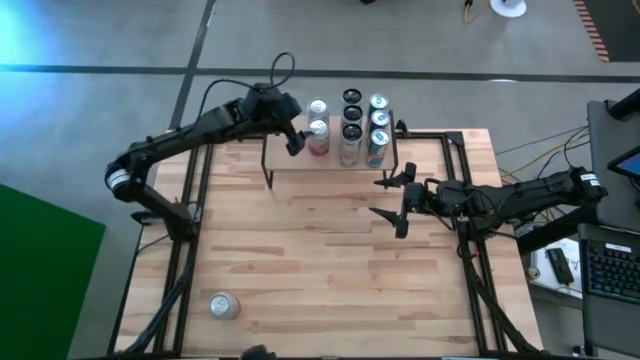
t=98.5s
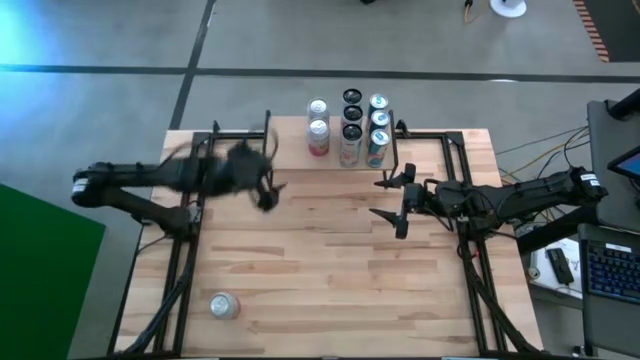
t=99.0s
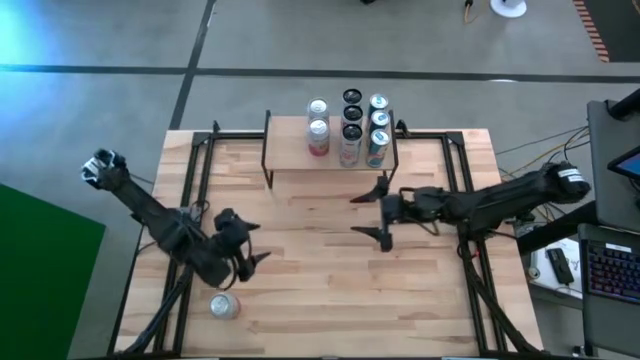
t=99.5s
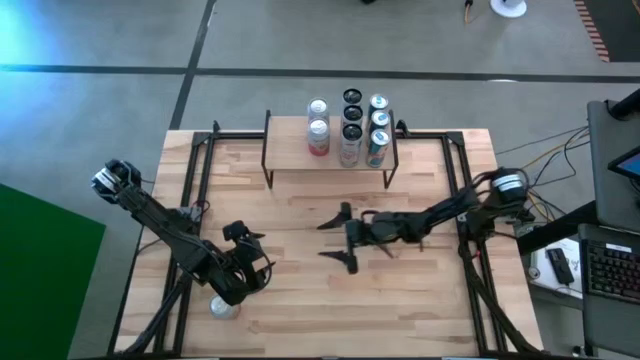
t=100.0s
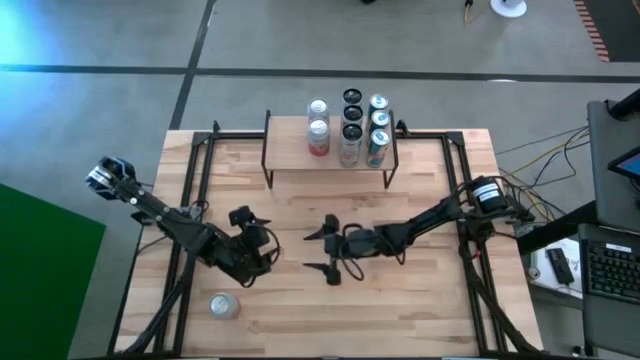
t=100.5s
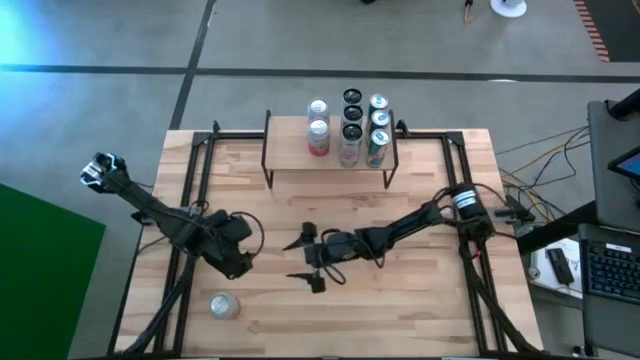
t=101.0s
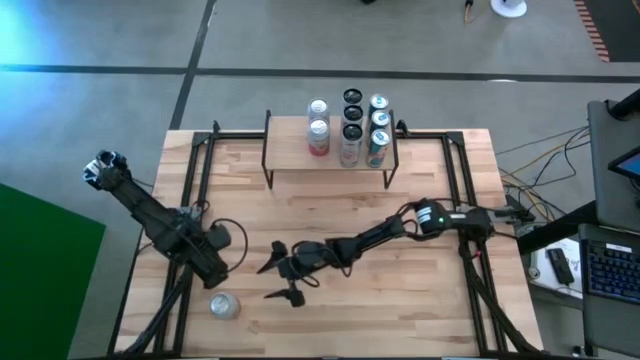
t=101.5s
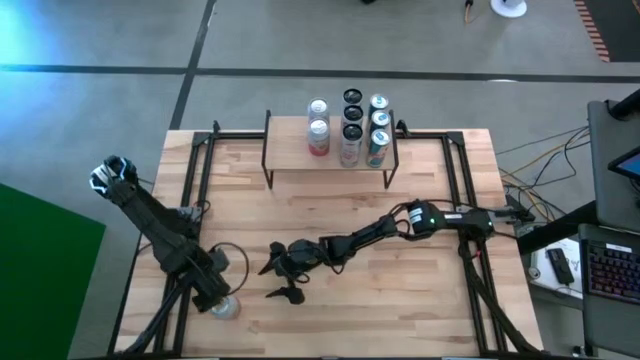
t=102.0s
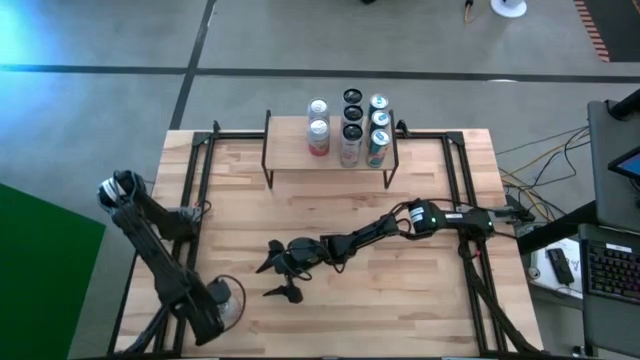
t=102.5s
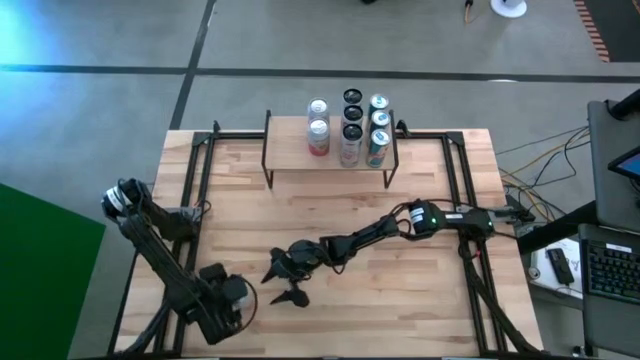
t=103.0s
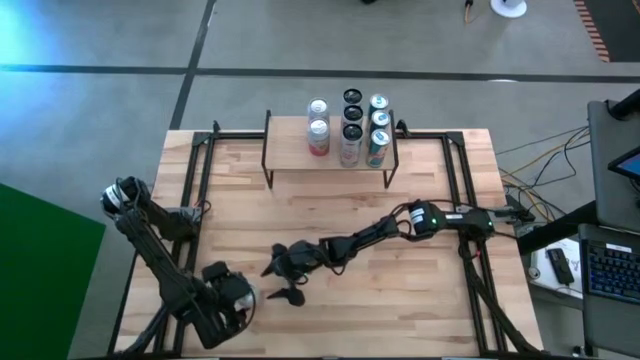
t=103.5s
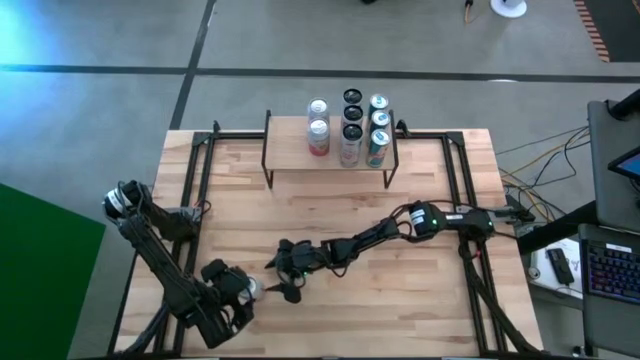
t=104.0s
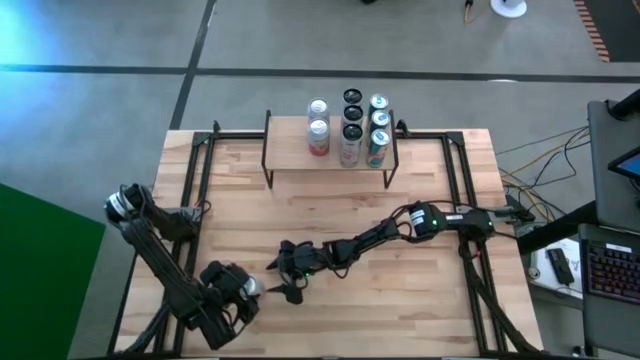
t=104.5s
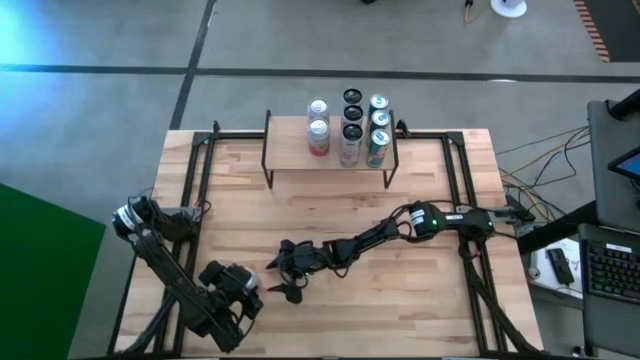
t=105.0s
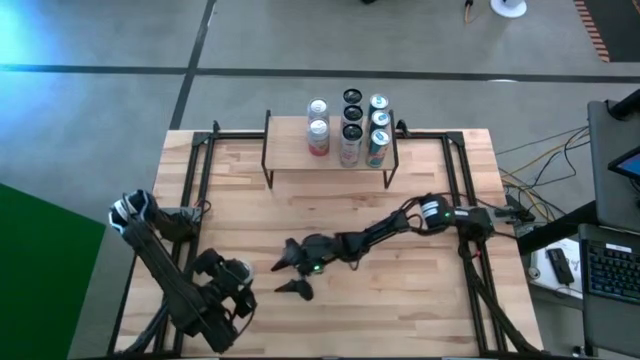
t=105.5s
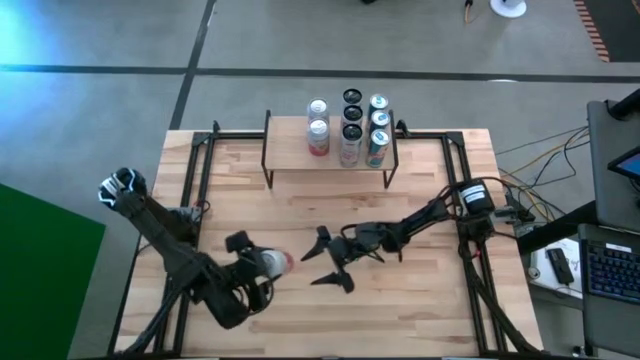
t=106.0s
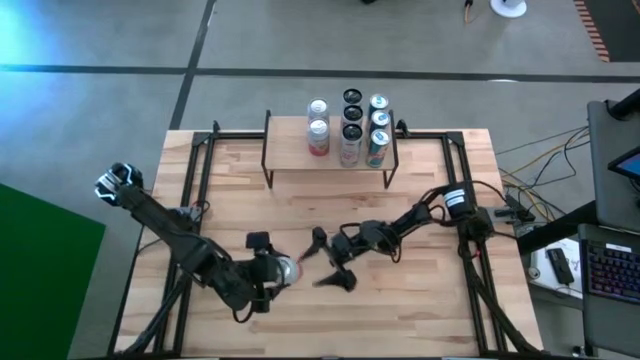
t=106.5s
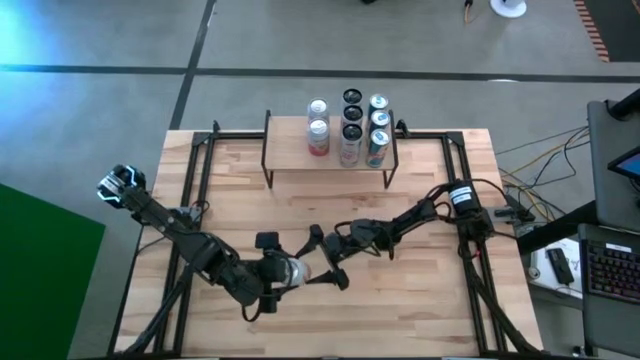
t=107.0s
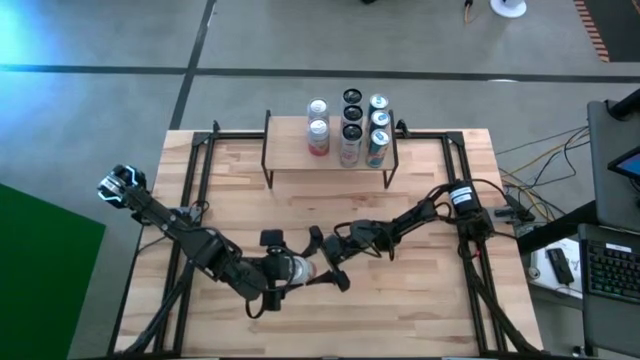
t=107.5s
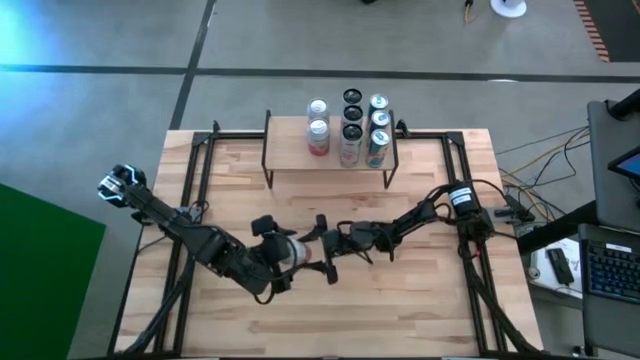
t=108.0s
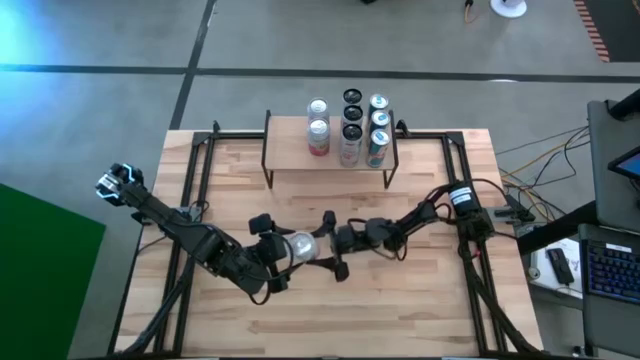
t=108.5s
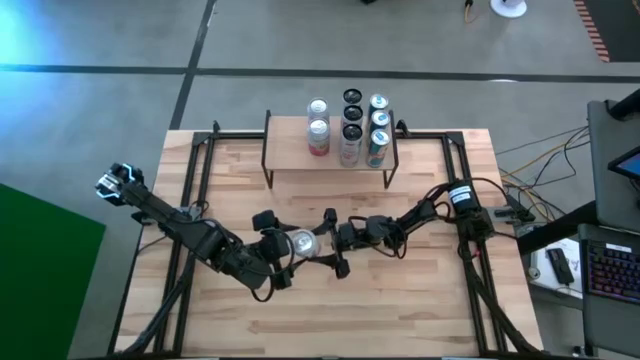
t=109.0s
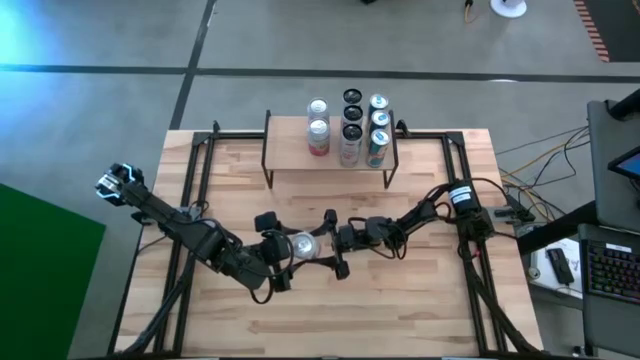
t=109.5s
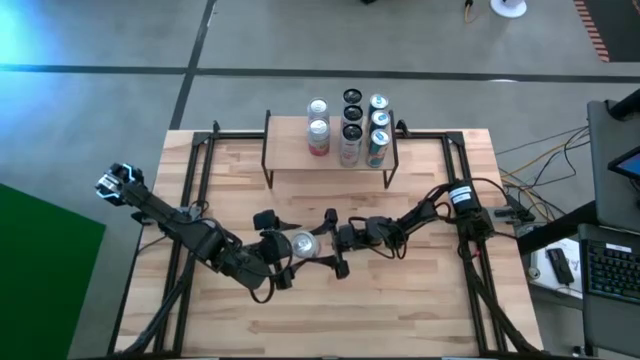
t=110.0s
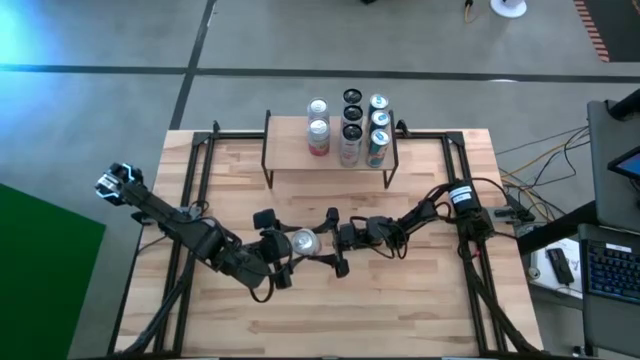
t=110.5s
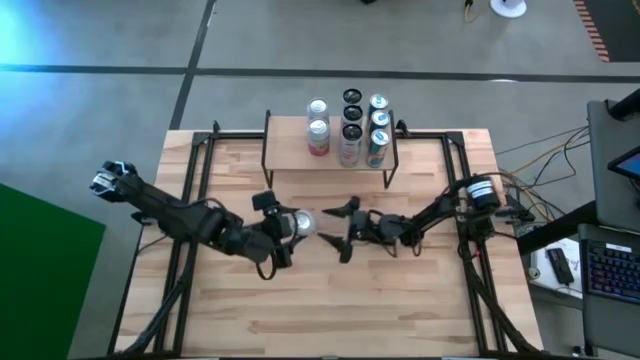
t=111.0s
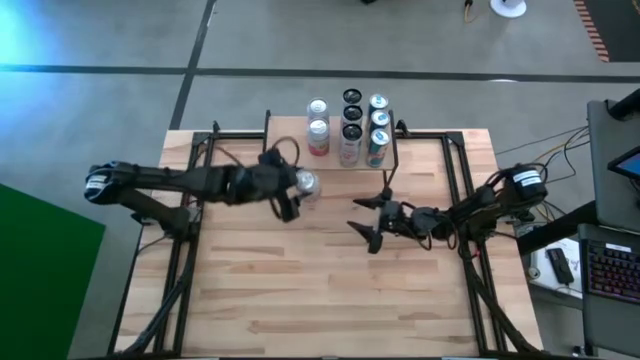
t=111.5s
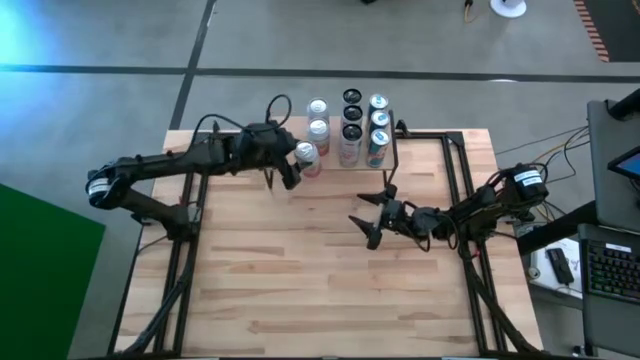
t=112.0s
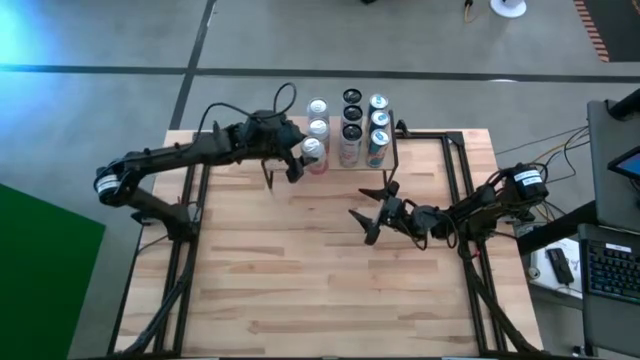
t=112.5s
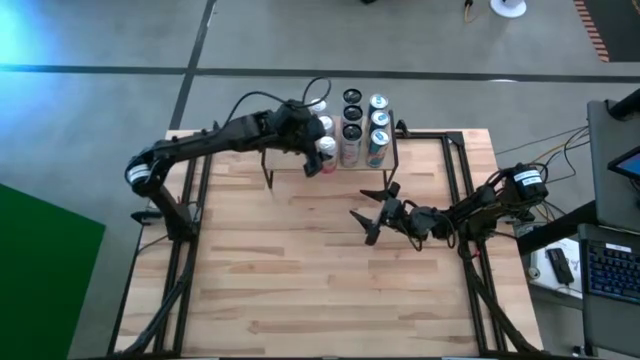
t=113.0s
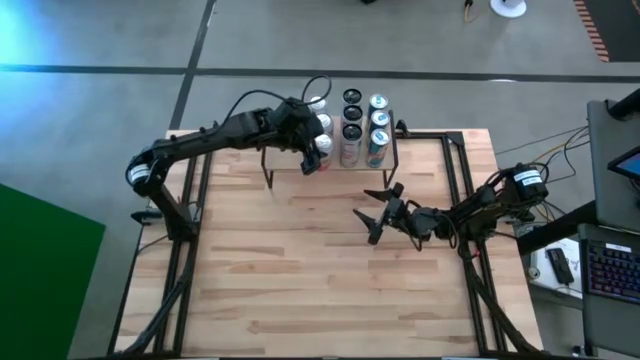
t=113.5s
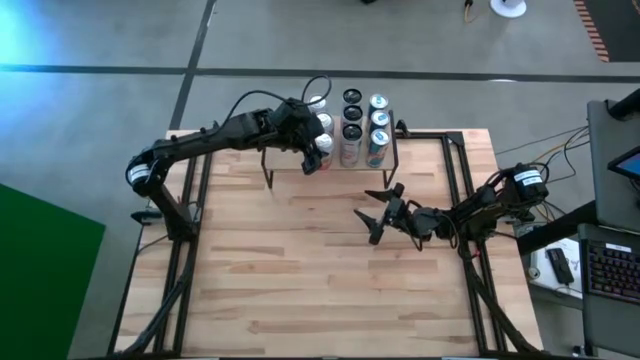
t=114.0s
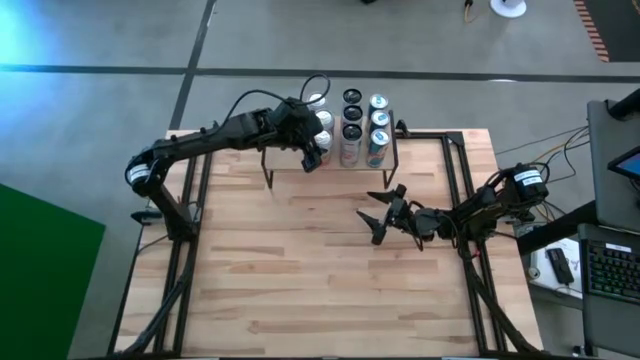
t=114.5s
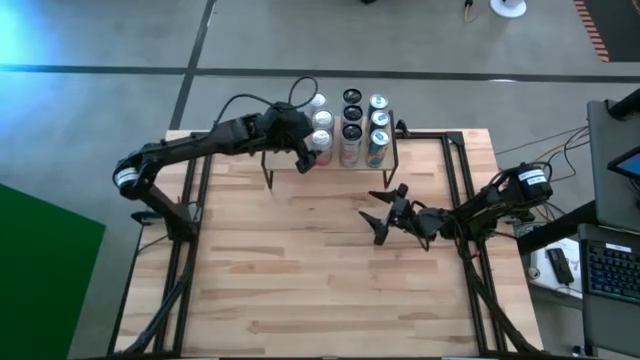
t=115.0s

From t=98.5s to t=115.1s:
Task: Place canned beverage on shelf
Put the top pink white soda can on the shelf aligned with the other pink white soda cans

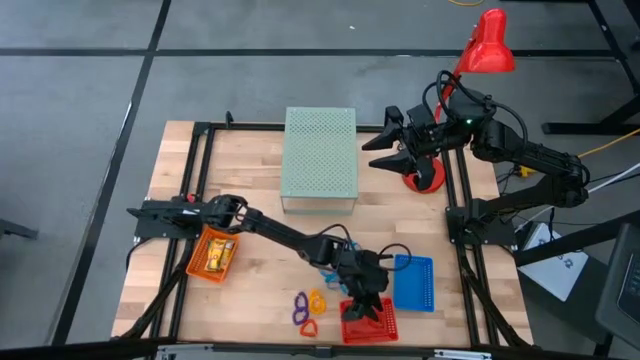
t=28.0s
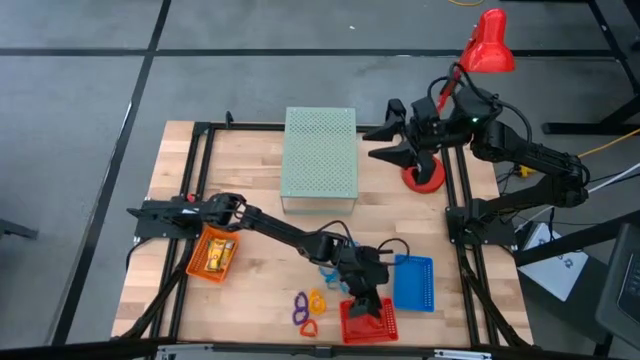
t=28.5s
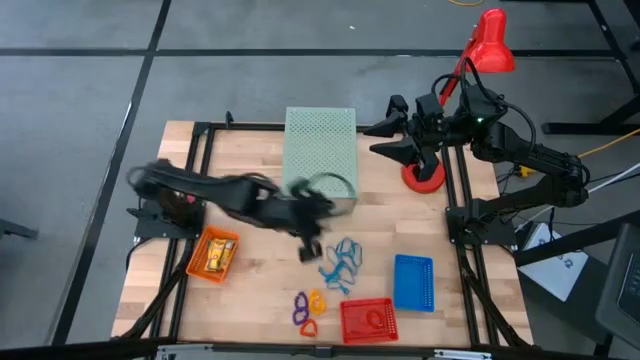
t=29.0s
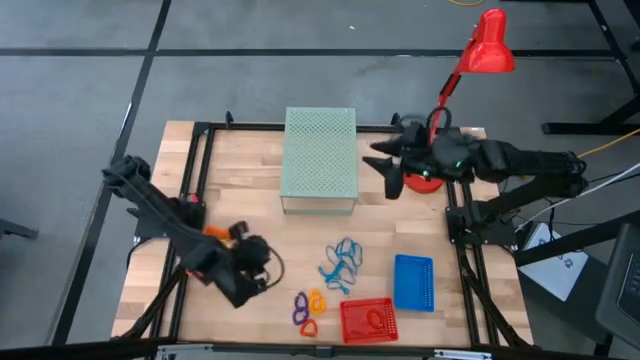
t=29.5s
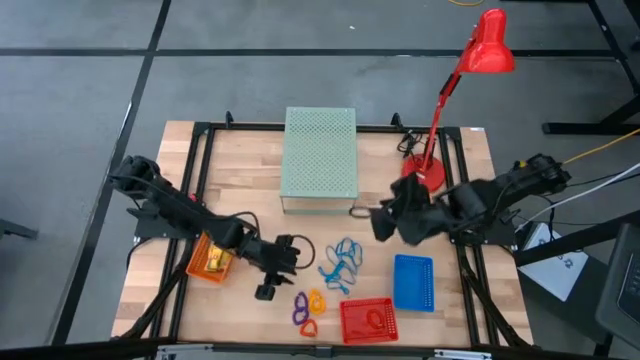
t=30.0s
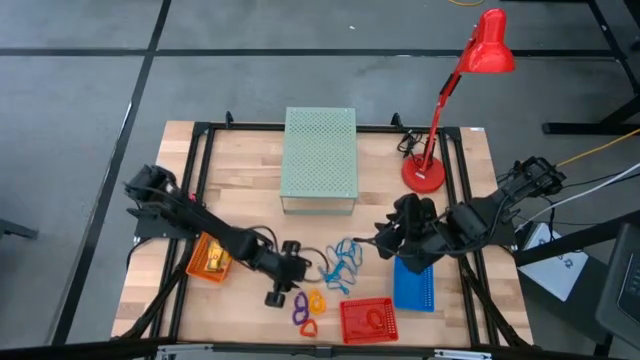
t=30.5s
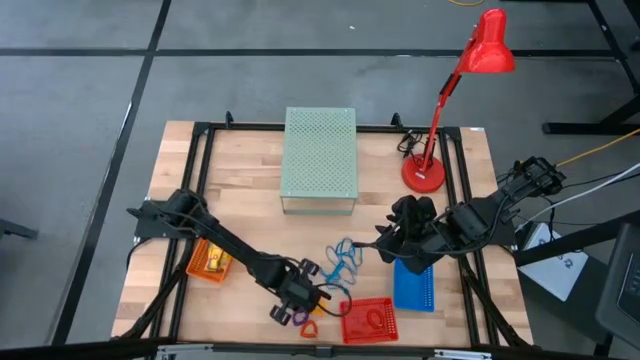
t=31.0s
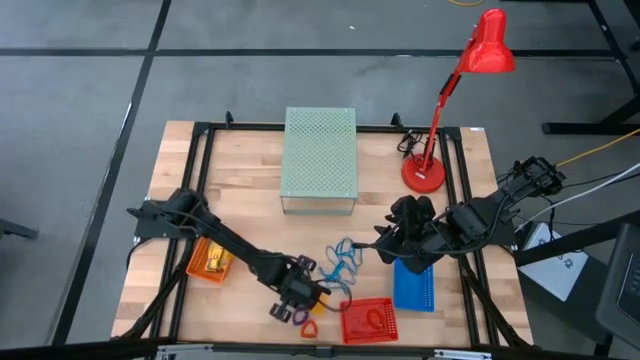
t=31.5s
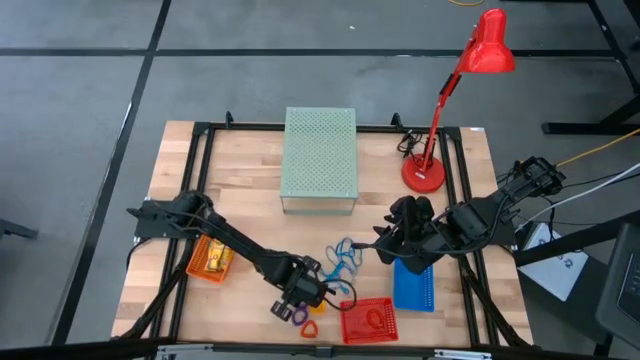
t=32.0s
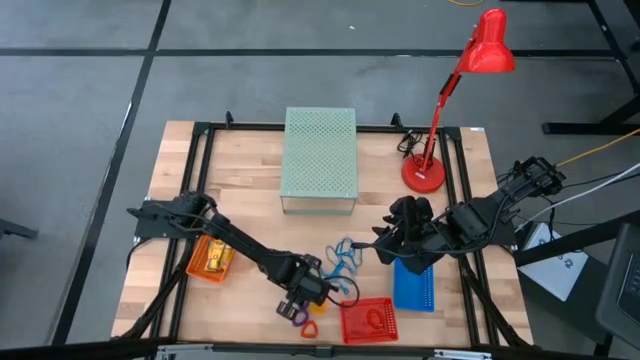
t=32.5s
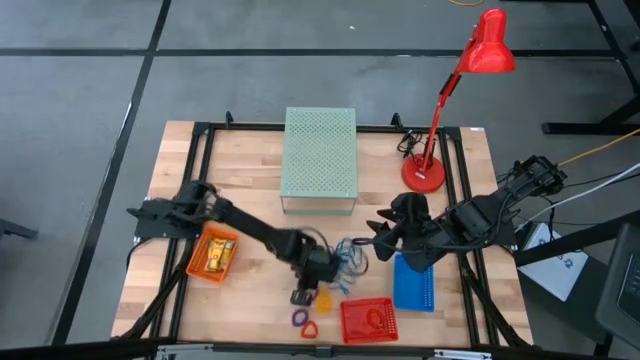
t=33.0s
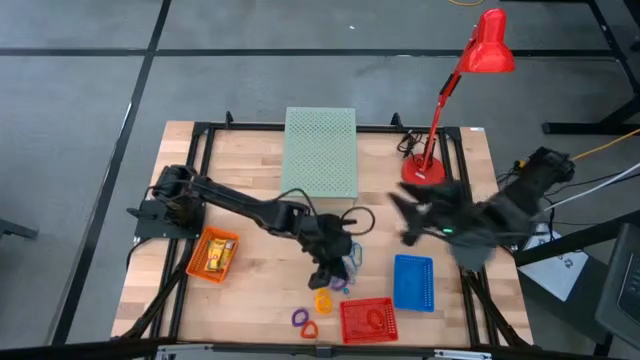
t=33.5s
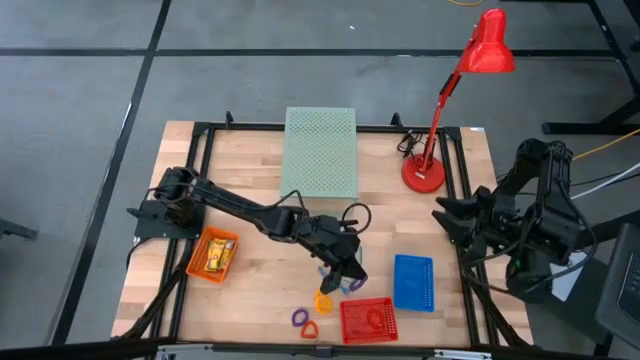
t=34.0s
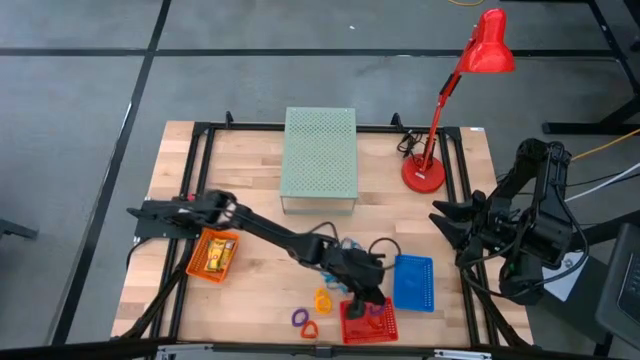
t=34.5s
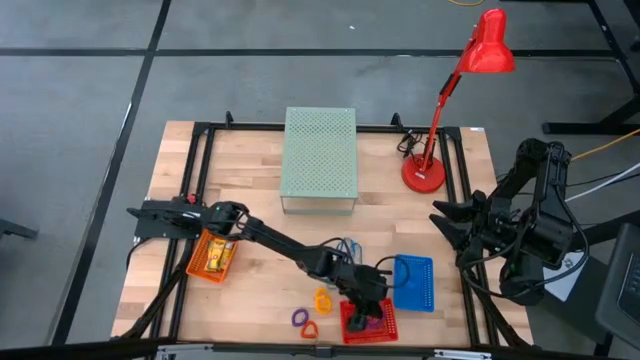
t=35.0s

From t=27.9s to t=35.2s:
Task: Pick & Place Office Desk Supplies
Put the violet coil keychain into the red bin
